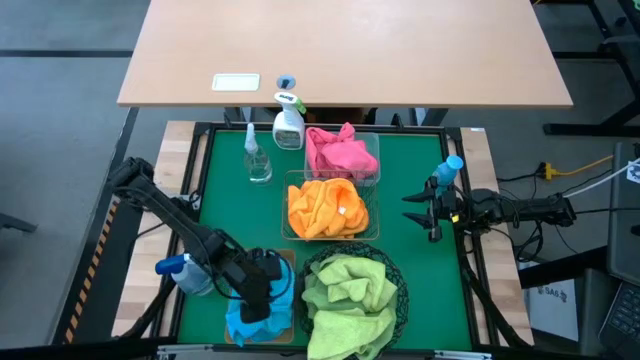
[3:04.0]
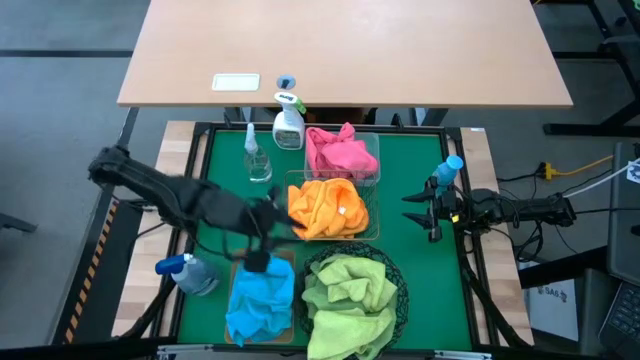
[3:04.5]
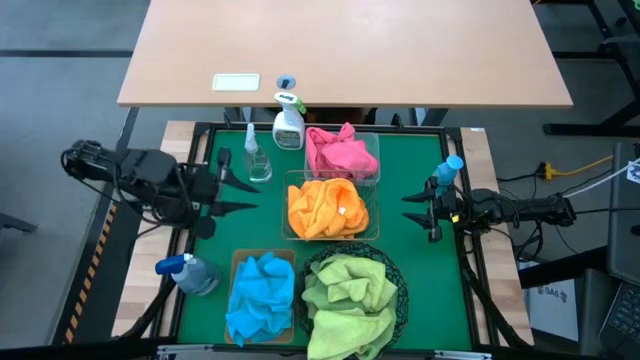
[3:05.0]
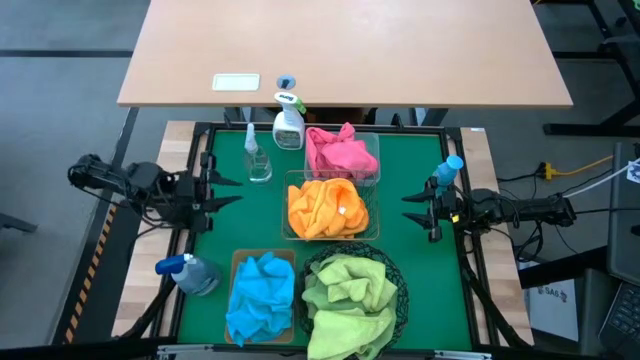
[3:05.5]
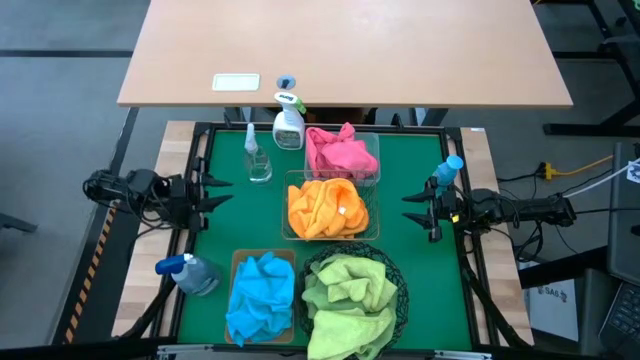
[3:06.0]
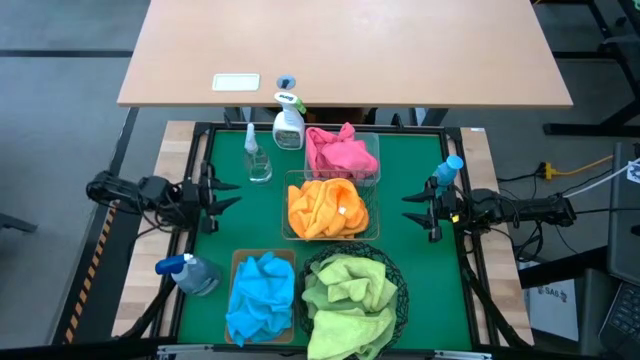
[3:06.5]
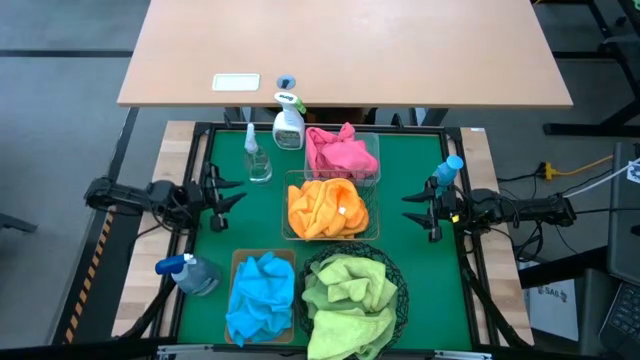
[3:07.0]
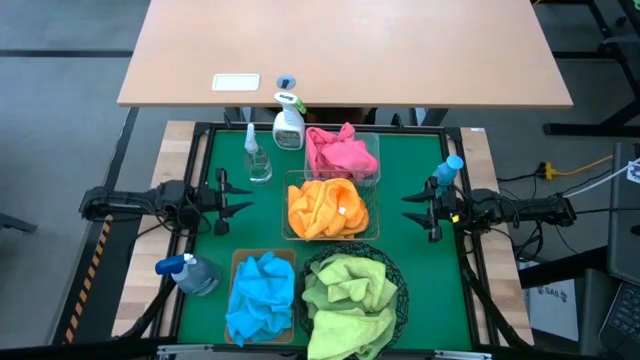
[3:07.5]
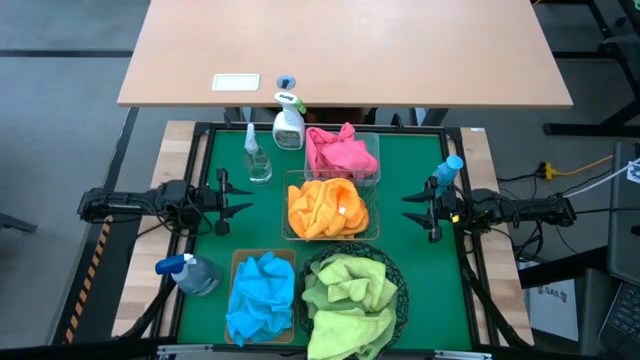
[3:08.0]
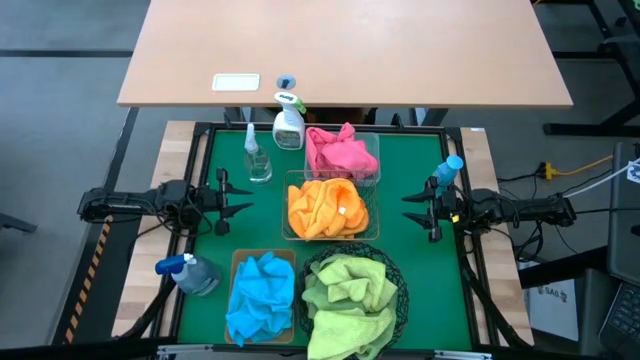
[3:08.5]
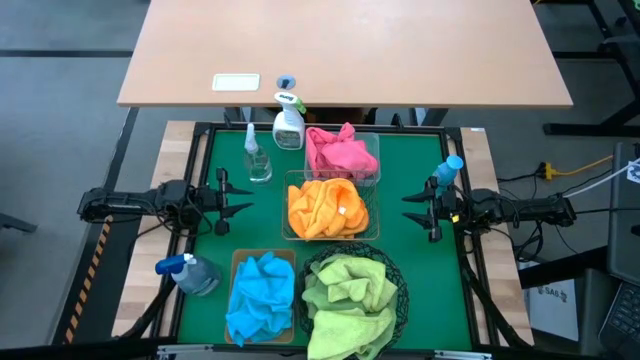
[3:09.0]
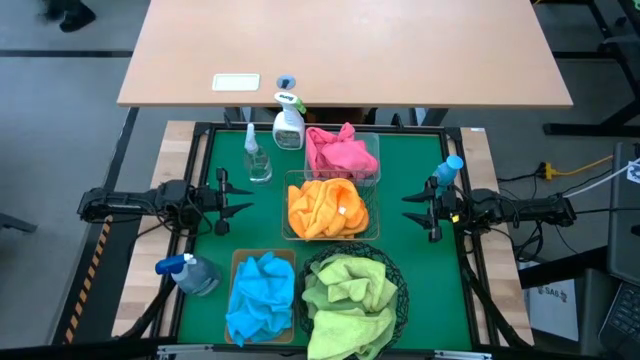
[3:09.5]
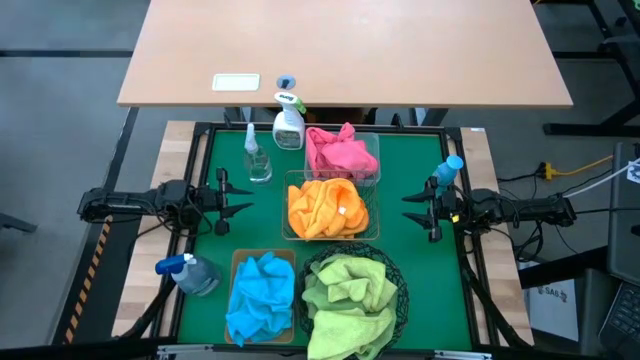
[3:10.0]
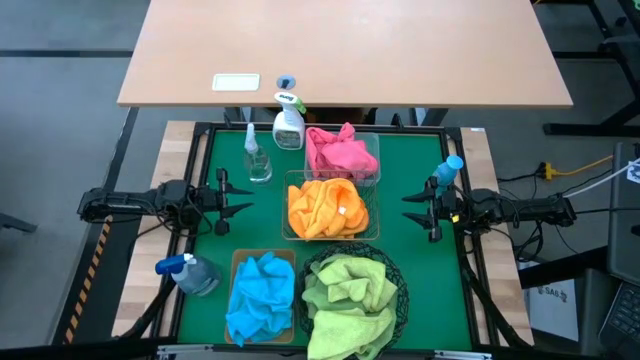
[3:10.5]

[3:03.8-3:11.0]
Task: Sort microfiber towel by color & place in baskets
Return to Home Position

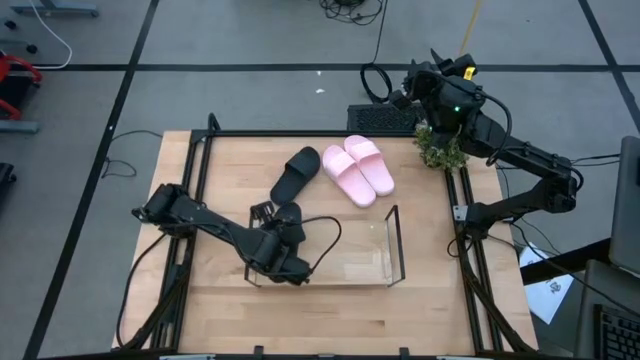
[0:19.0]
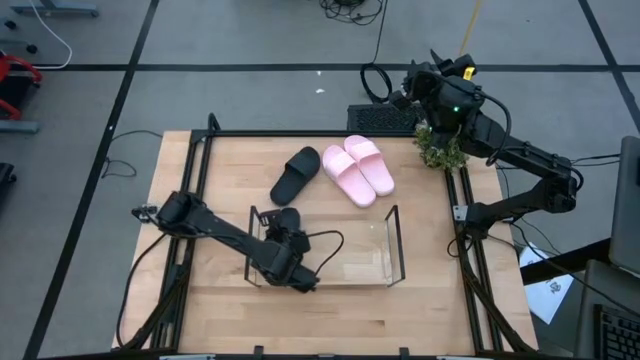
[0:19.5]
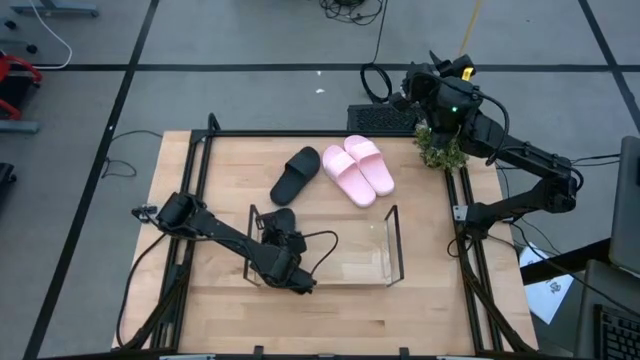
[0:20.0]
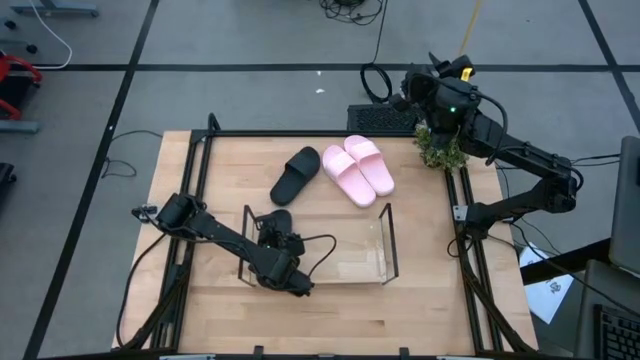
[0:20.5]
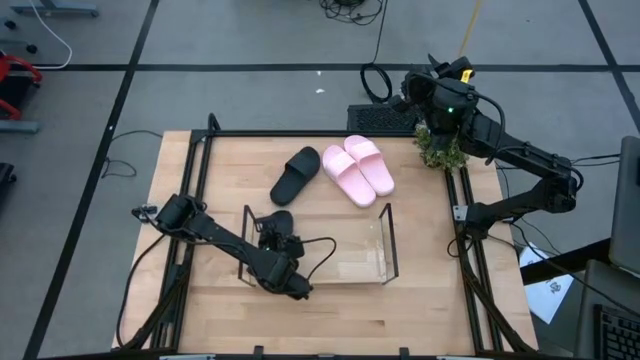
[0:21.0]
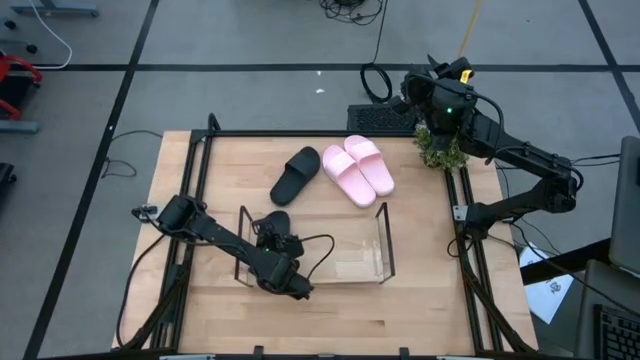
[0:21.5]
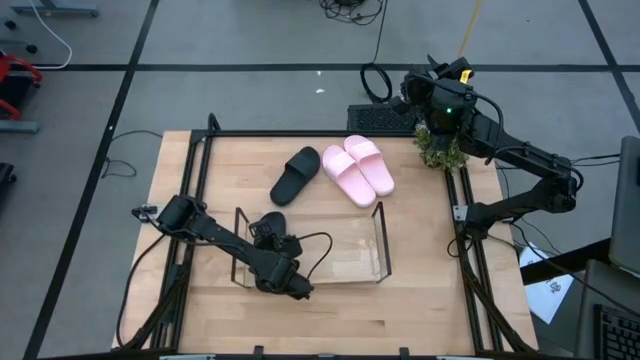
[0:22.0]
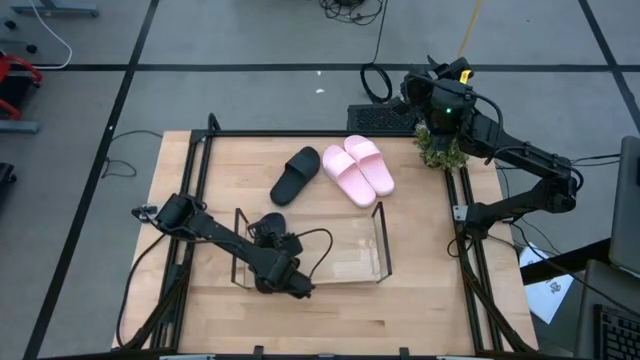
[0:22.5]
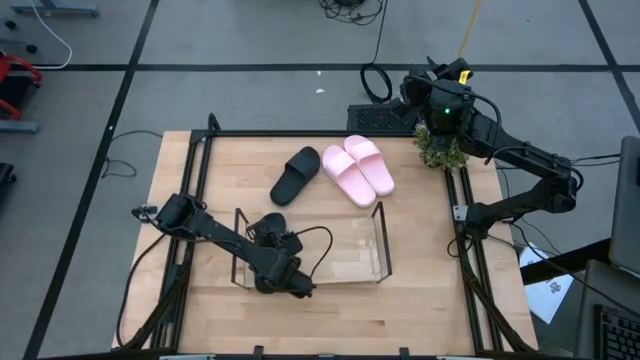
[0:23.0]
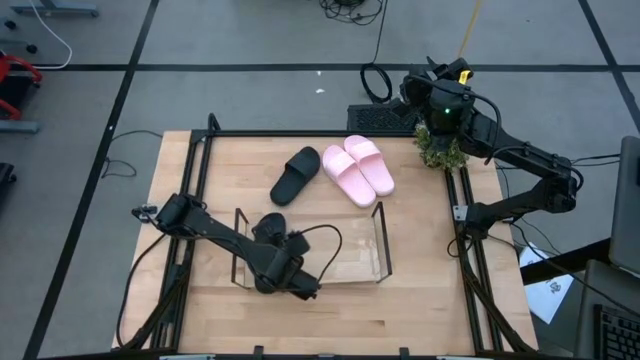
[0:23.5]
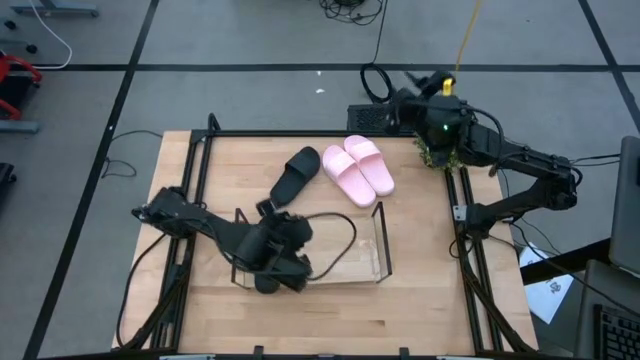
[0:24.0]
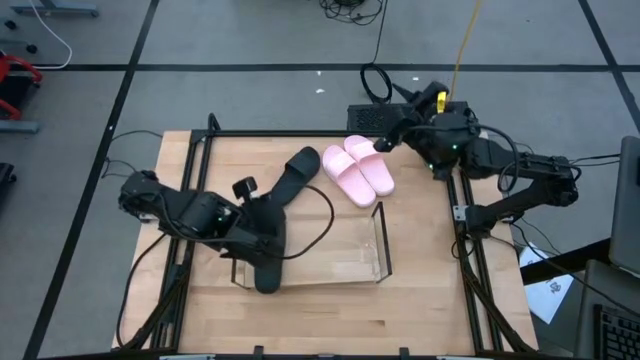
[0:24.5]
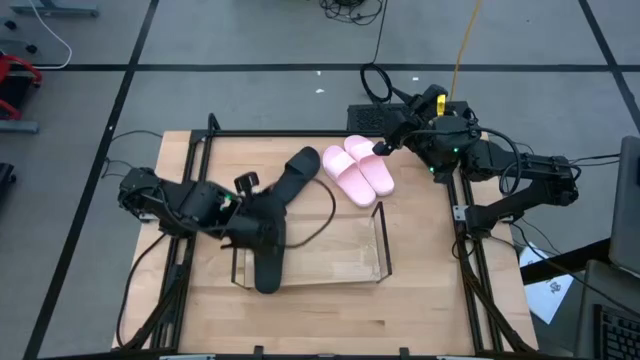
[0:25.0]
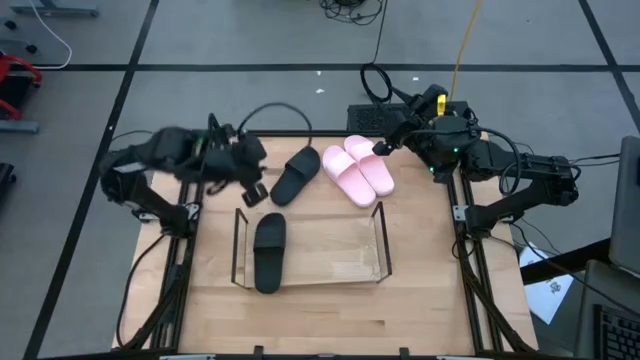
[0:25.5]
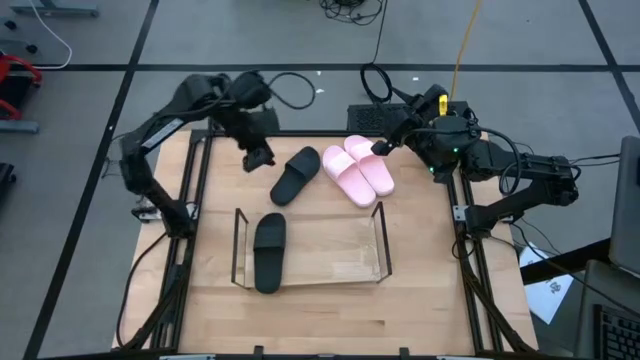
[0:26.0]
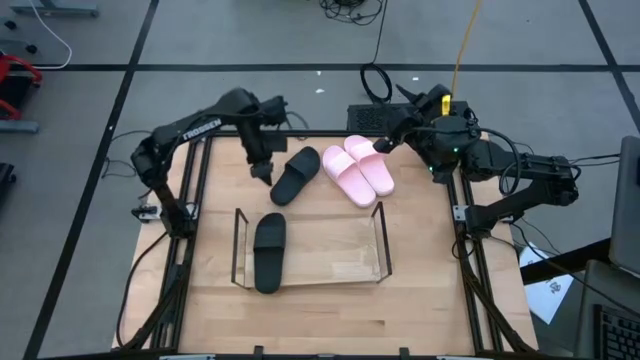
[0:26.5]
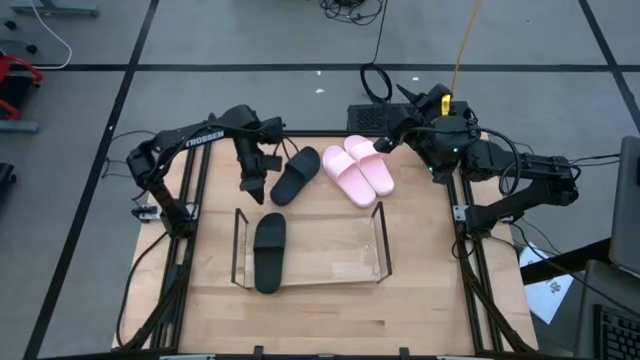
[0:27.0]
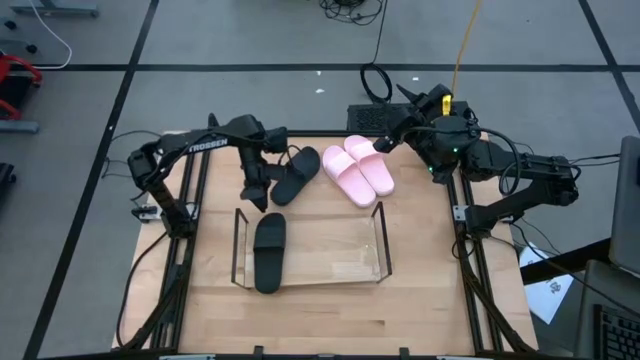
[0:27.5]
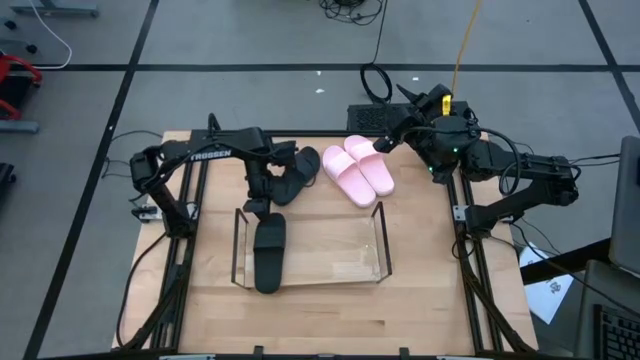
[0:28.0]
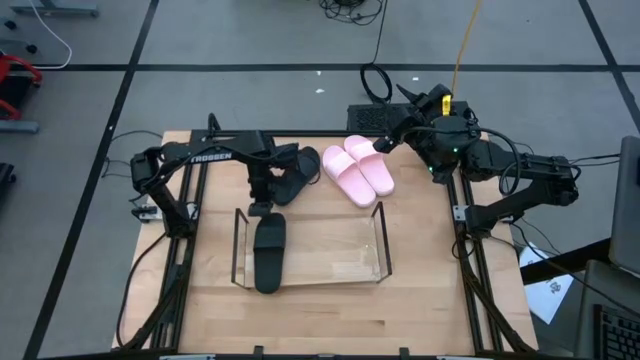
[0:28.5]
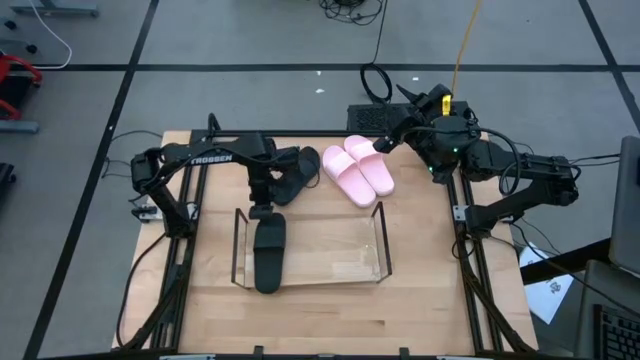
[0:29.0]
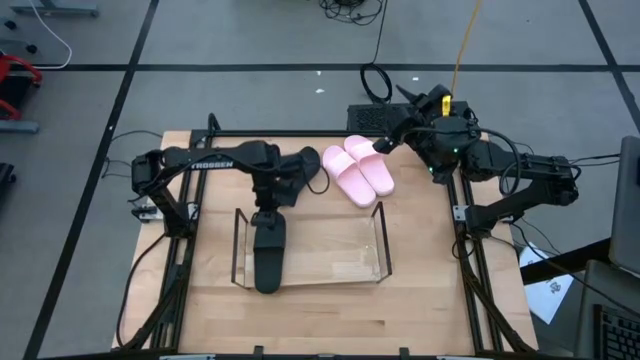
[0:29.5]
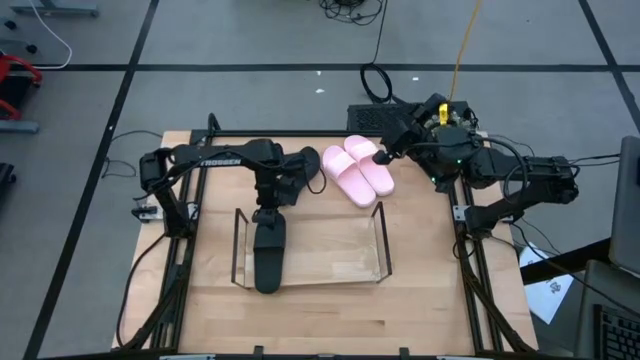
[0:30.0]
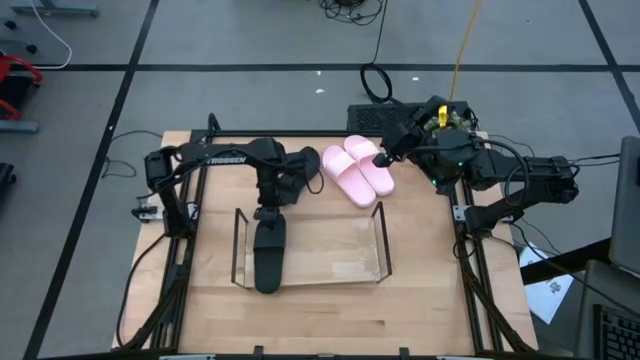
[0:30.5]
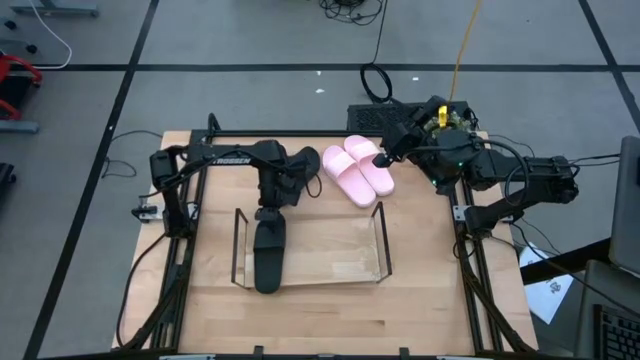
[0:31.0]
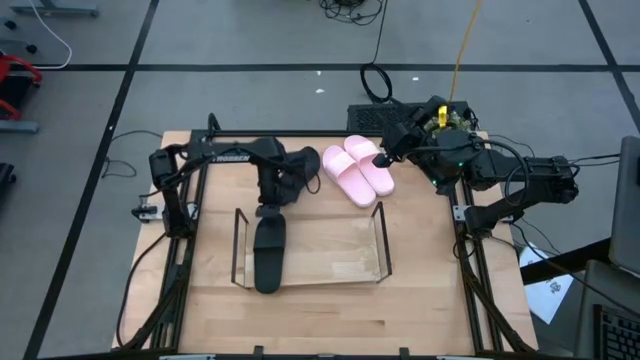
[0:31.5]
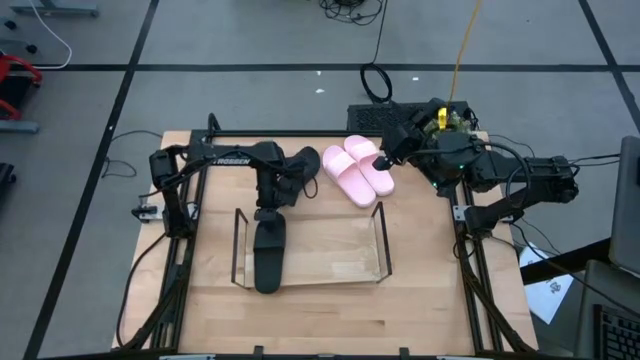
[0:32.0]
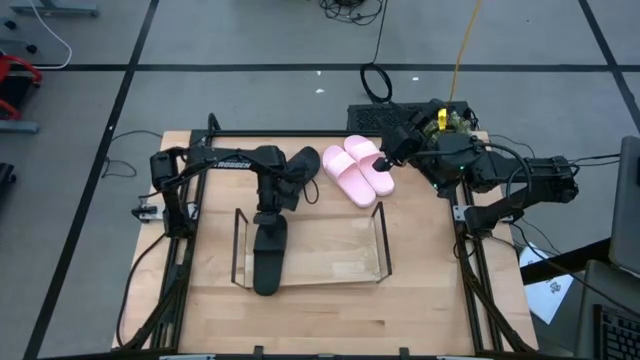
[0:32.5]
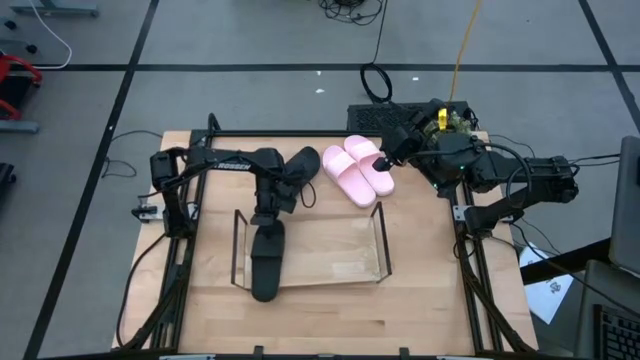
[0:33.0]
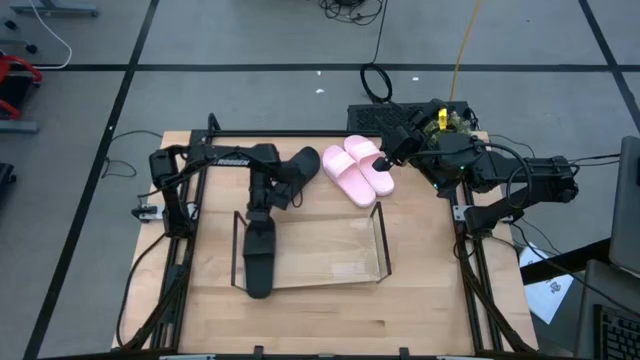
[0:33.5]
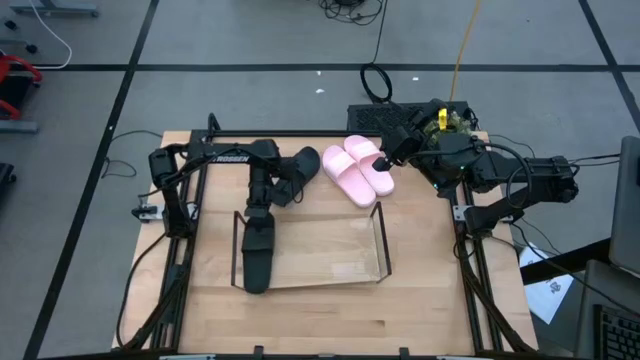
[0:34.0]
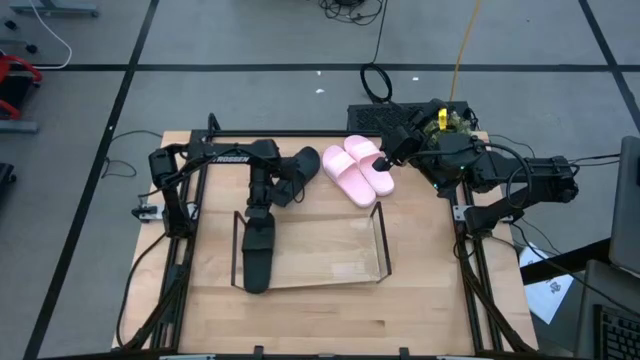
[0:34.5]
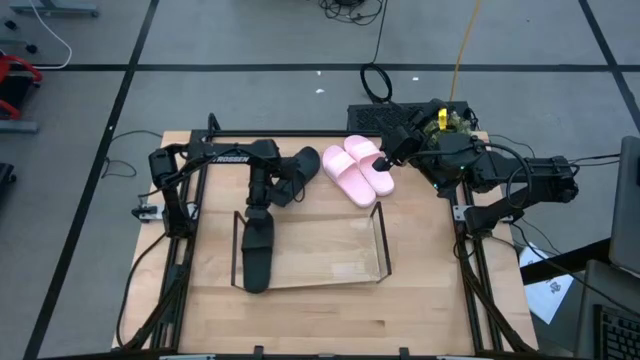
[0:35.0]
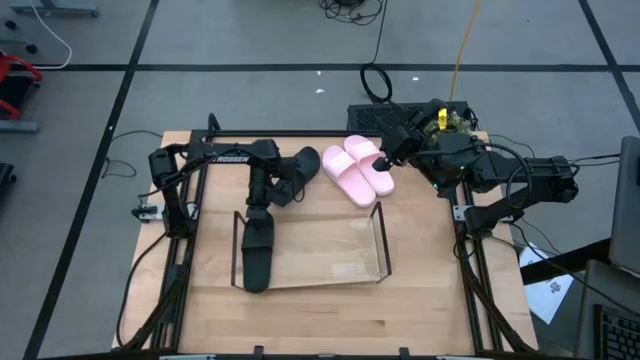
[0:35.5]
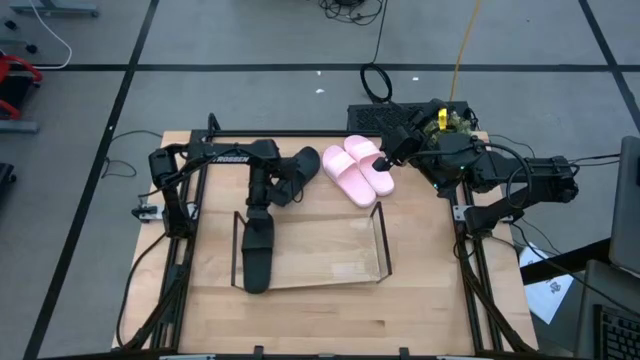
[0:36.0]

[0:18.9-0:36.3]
Task: Pick and place slides into the shelf
Put the left black slides on the shelf
